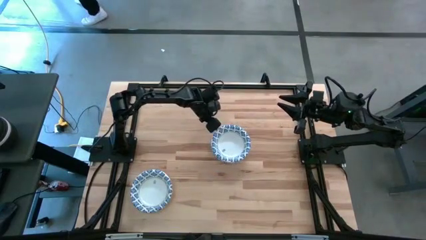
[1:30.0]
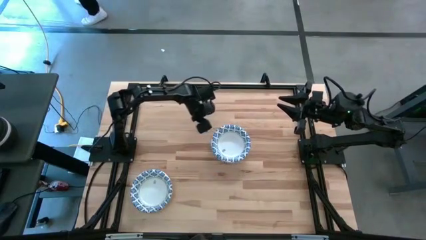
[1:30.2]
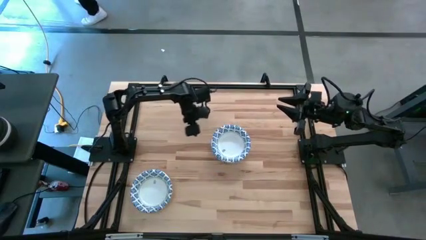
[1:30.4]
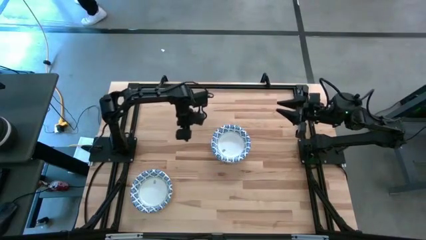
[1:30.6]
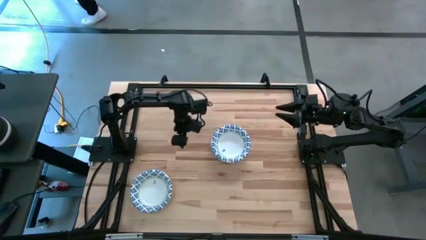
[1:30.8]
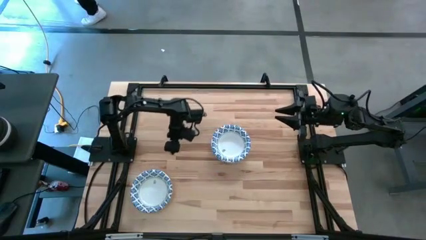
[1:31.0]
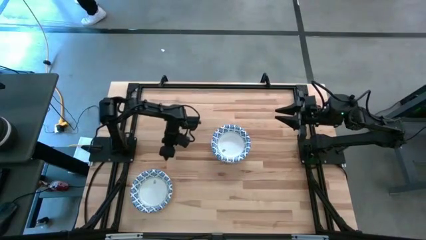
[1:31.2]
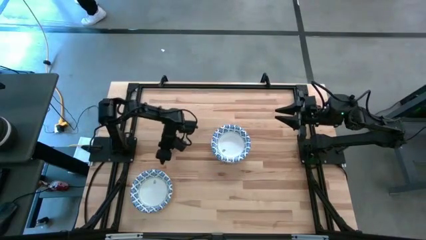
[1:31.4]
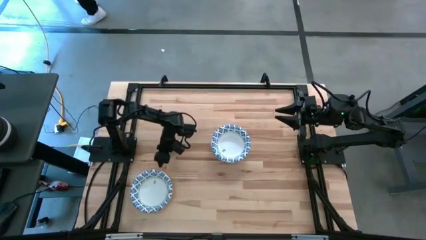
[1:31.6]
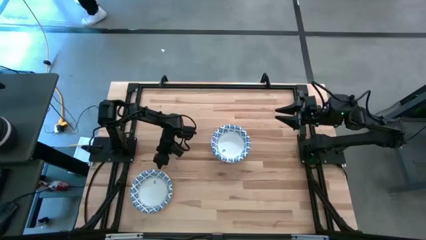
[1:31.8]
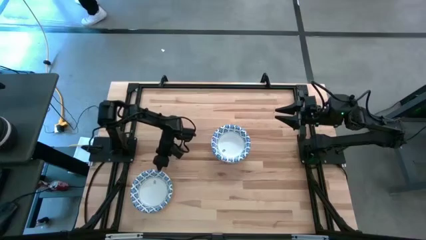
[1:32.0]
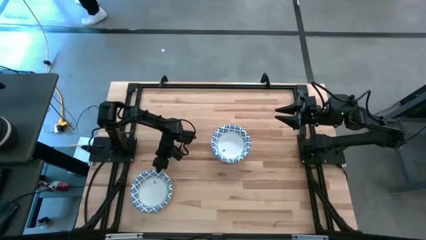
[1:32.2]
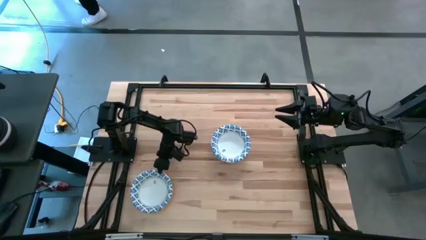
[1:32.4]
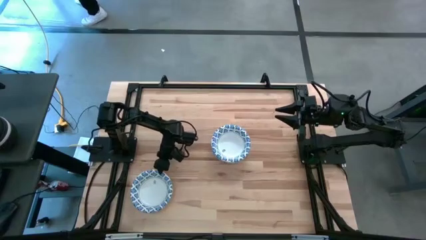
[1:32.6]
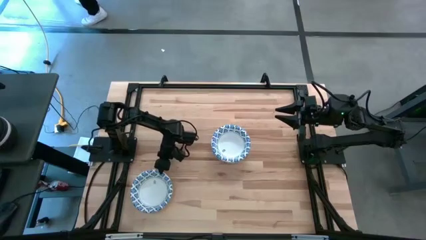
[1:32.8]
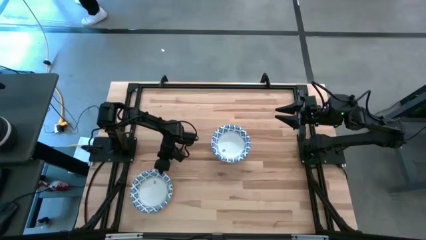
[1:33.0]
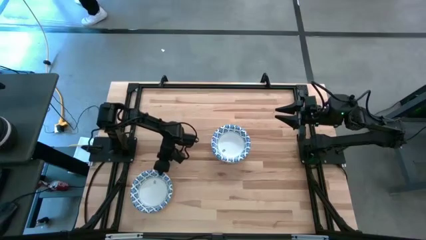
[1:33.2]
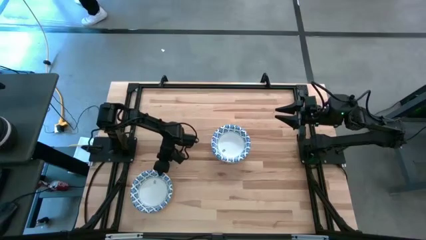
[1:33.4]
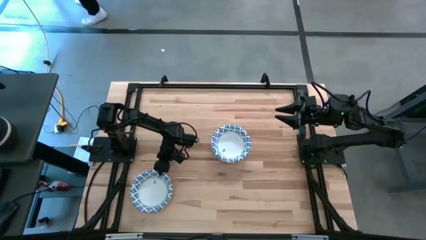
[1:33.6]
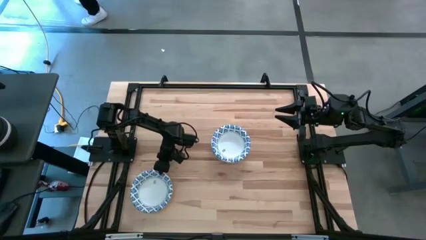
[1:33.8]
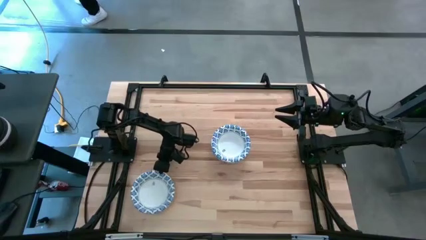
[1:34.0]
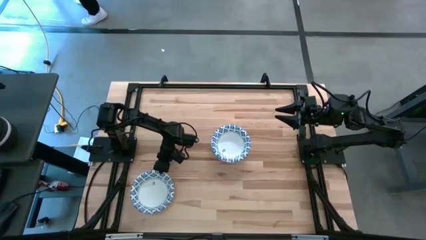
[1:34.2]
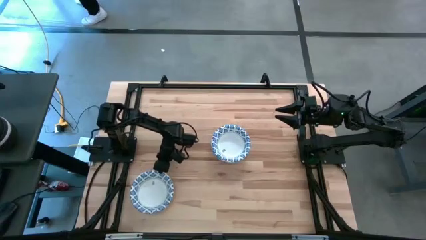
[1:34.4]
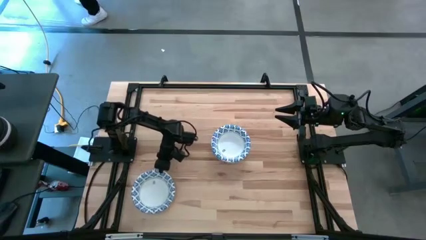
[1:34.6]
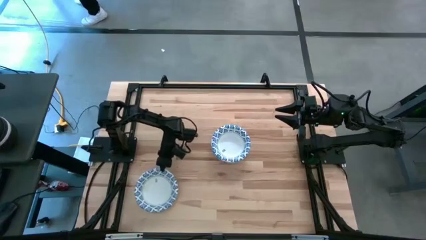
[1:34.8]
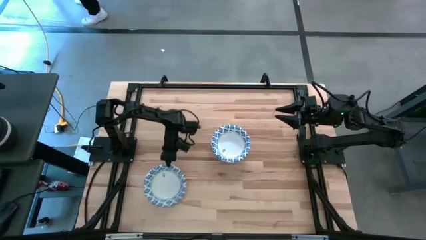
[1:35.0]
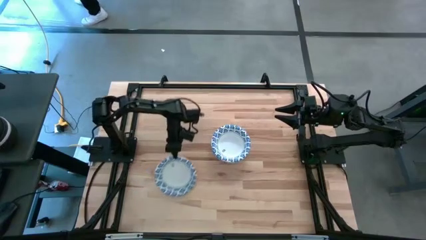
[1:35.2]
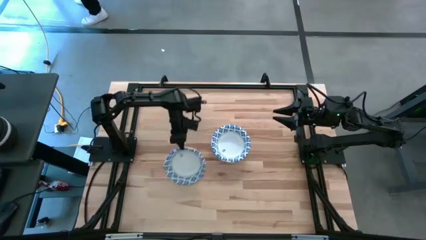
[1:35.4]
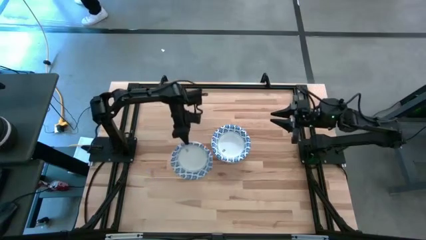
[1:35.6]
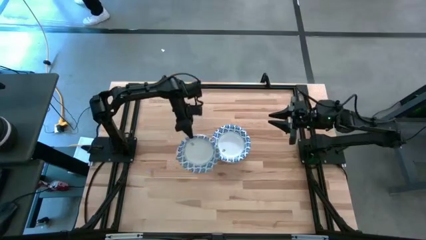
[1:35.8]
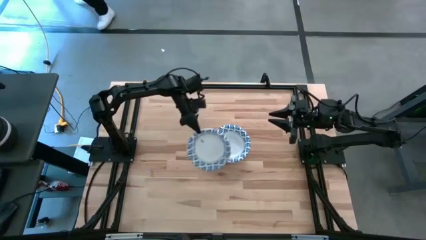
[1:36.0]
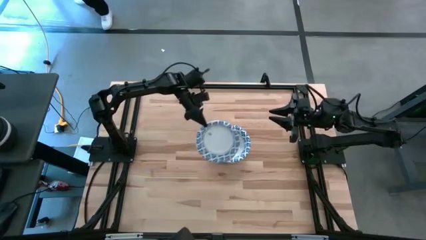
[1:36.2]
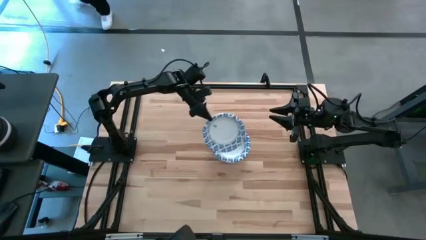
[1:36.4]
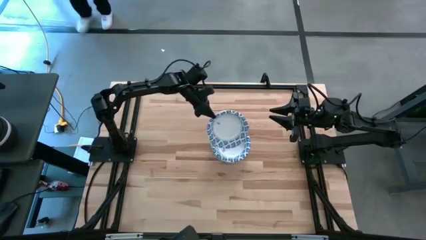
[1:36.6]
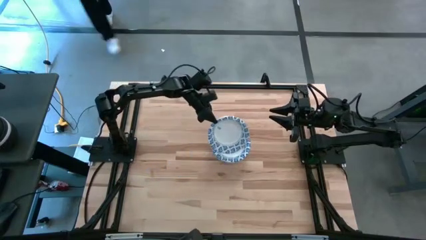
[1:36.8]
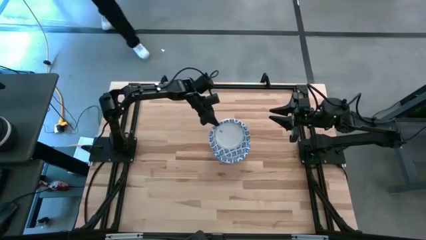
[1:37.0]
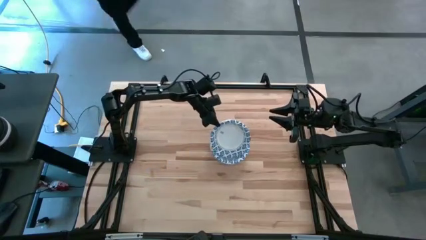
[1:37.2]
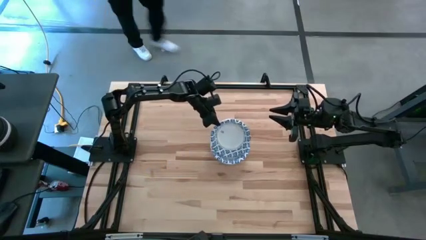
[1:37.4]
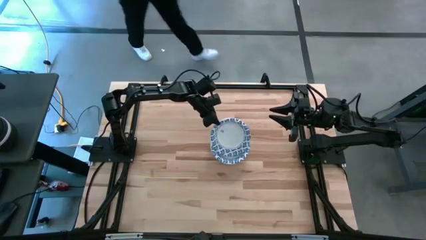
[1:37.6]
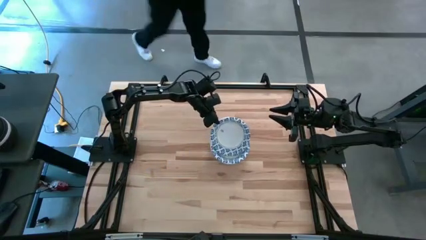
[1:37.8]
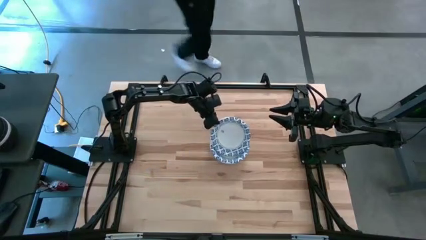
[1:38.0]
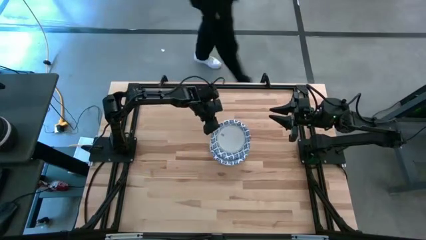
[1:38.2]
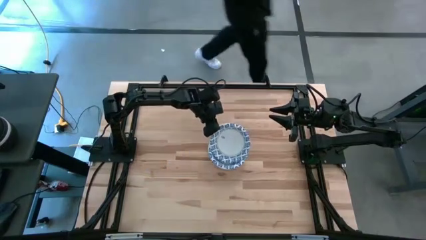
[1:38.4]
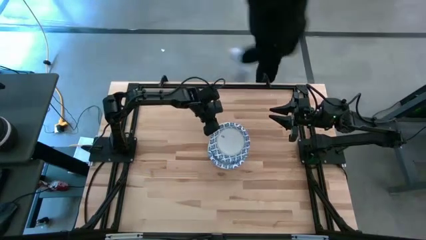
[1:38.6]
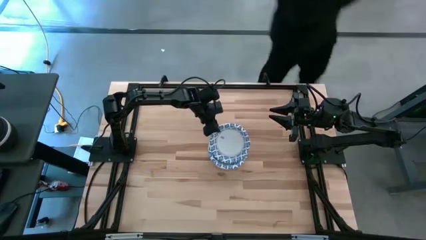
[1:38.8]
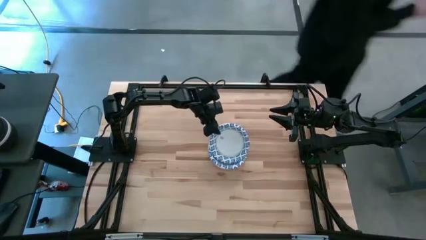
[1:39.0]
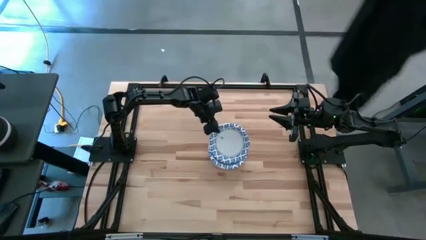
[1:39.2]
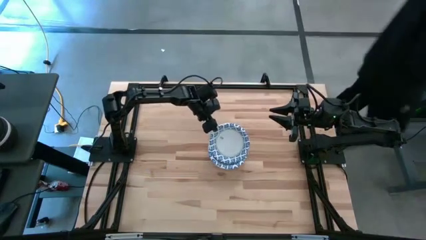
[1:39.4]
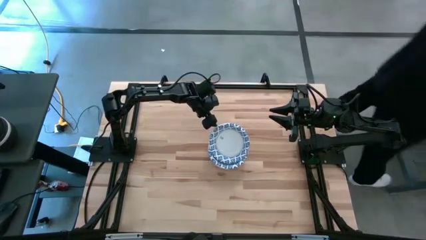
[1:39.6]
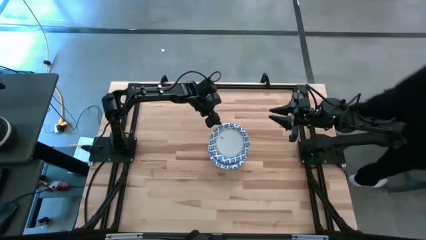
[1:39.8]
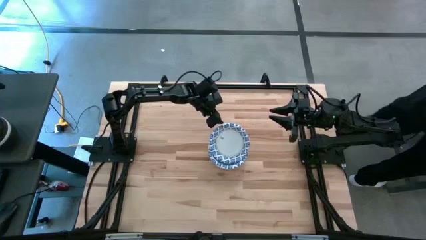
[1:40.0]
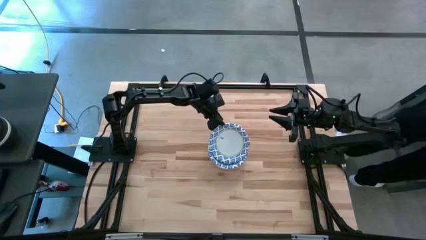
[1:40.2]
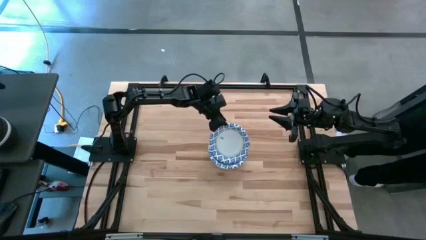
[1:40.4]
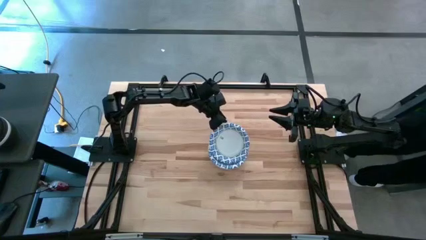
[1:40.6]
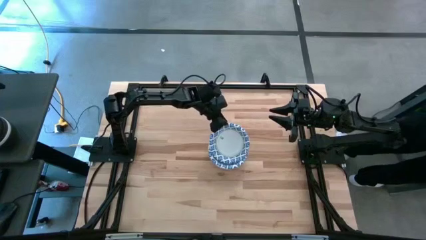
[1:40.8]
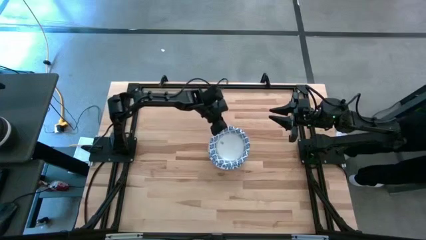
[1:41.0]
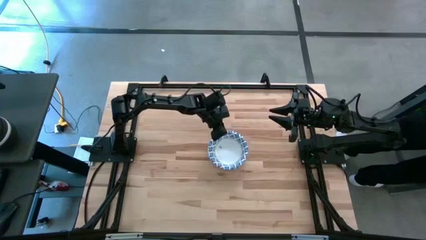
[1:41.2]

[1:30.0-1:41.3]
Task: Nest bowls inside each other
Stack the white patterned bowl on top of the other white patterned bowl

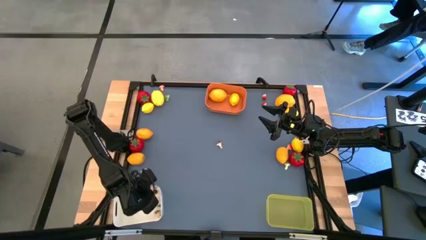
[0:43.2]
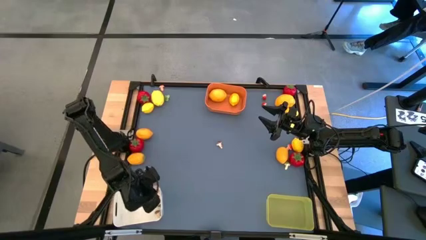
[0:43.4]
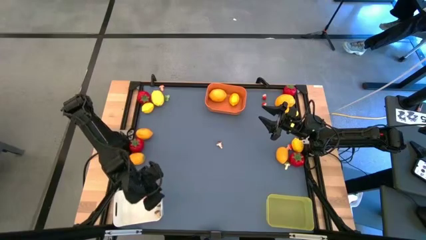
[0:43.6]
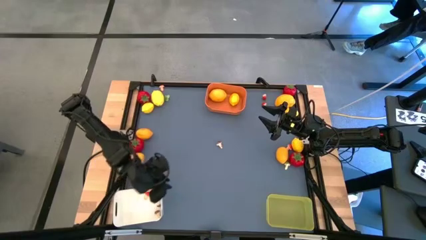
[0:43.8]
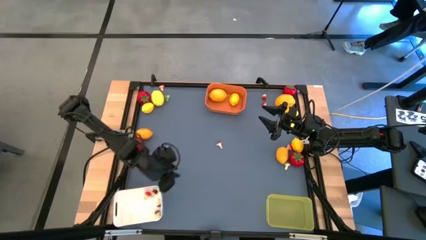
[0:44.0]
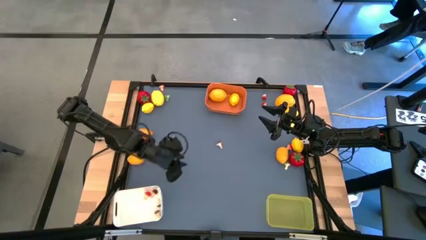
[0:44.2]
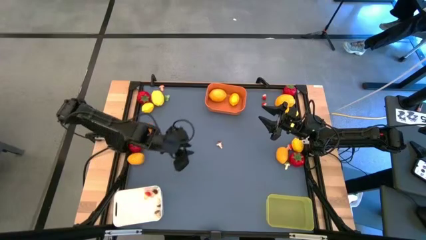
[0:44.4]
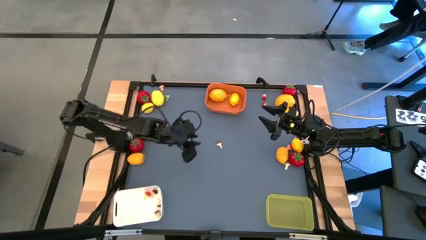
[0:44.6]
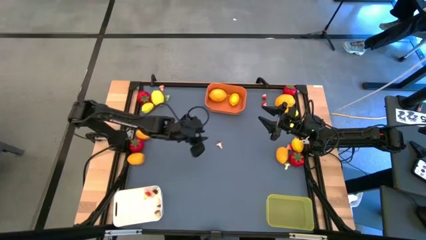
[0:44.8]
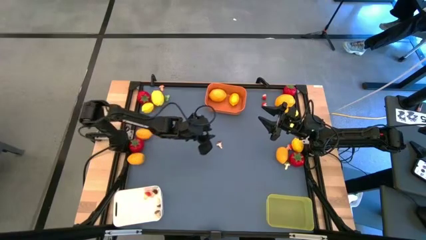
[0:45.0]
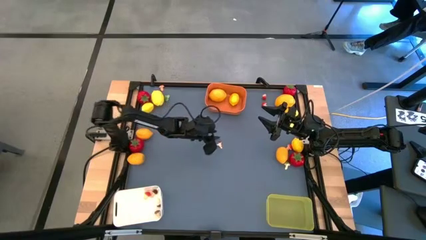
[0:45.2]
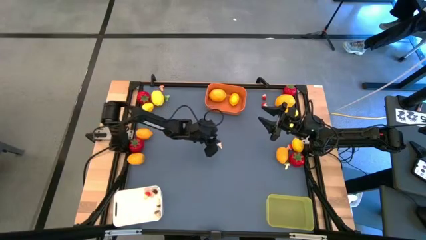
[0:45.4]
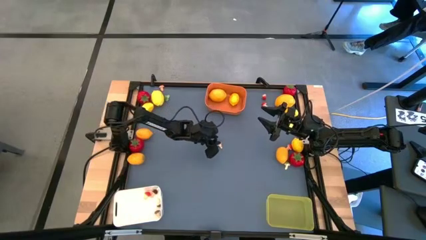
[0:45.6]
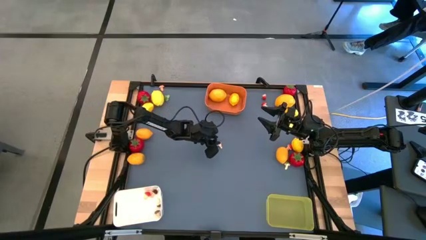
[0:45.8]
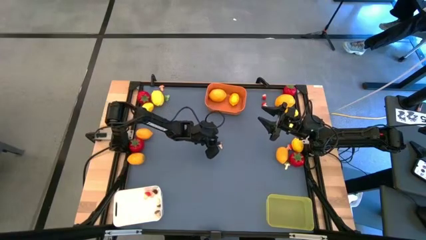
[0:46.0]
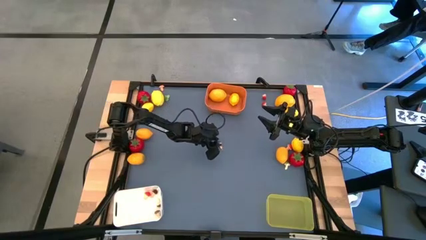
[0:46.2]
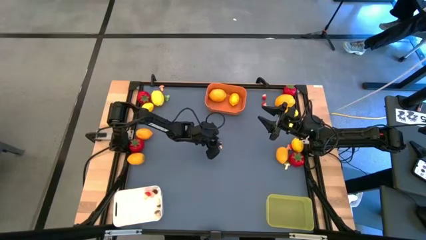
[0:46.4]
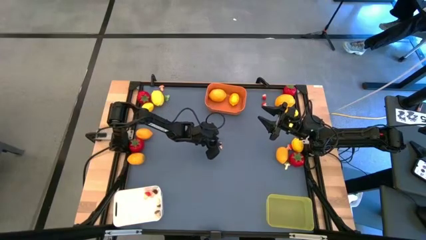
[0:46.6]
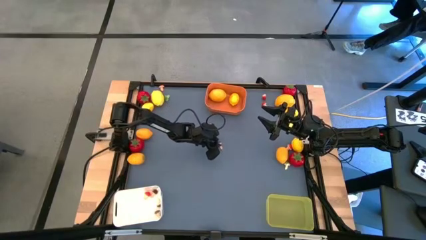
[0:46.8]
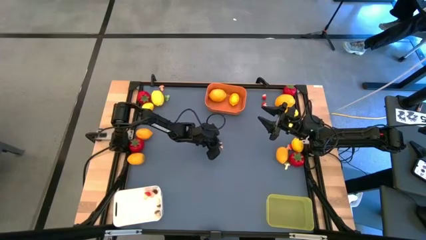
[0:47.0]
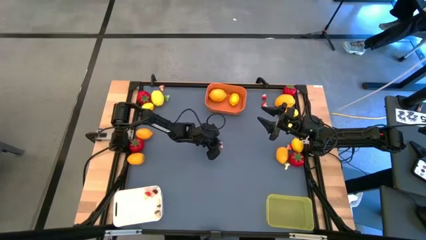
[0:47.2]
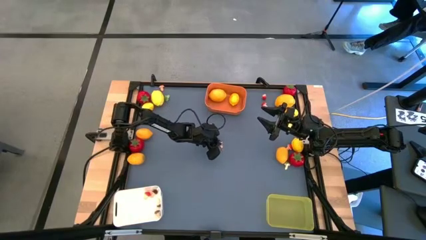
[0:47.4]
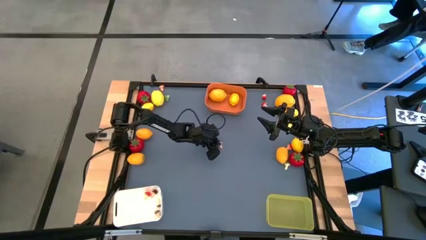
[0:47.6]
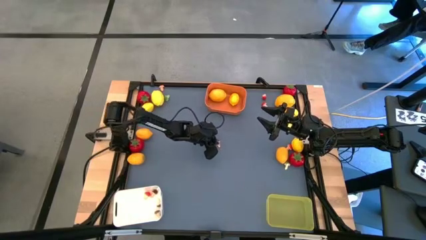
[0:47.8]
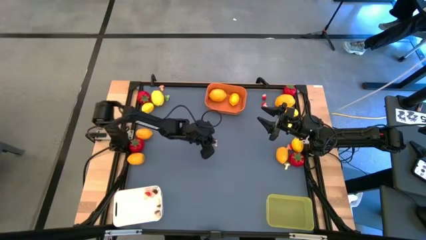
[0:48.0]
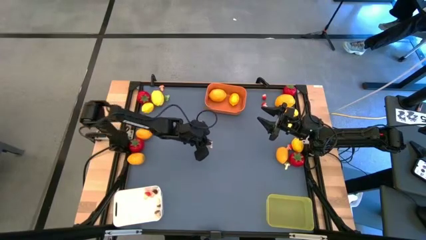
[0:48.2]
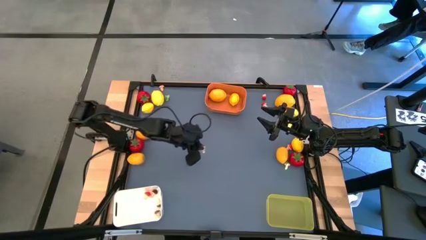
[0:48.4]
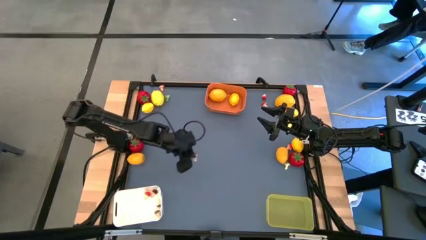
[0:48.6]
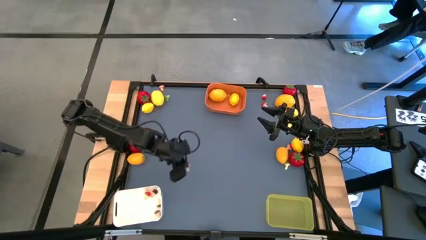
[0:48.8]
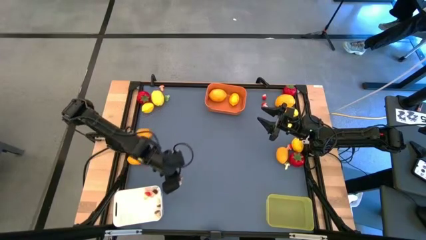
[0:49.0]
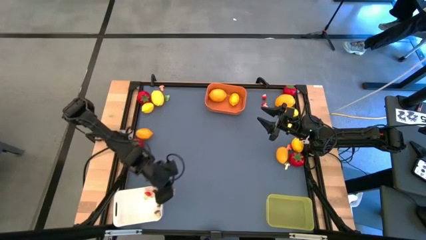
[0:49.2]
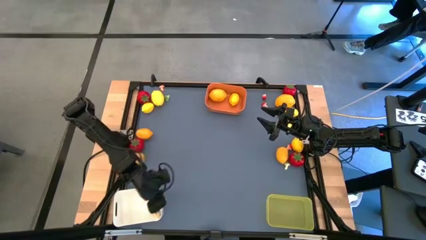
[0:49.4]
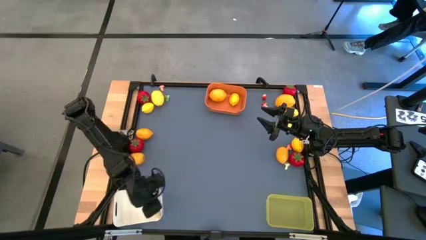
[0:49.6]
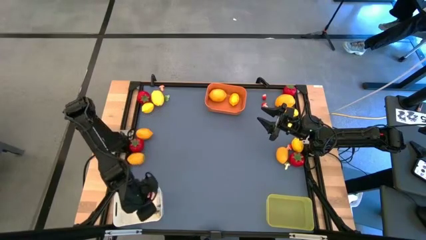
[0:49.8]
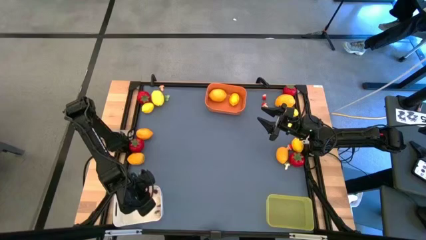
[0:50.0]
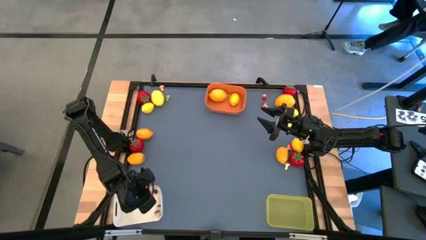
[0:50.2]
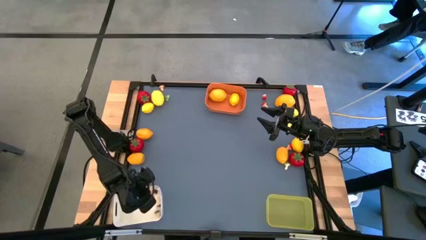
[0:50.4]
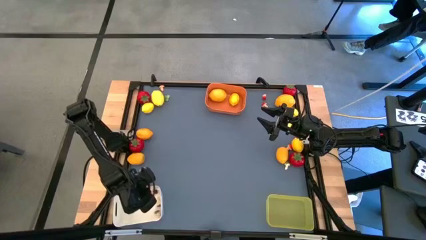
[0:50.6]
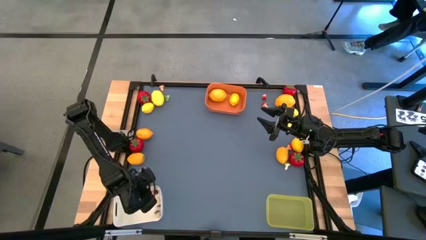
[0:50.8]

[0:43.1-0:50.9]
Task: Sort produce into baskets
Put the brown mushroom into the white bin
